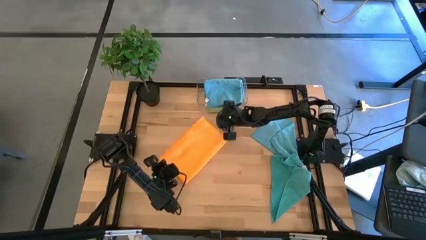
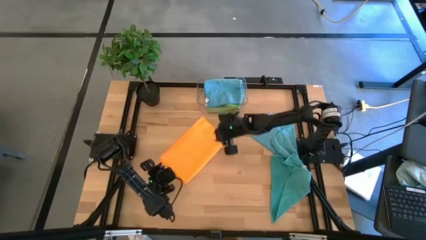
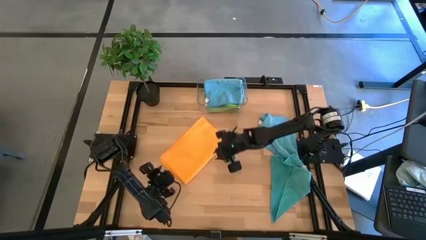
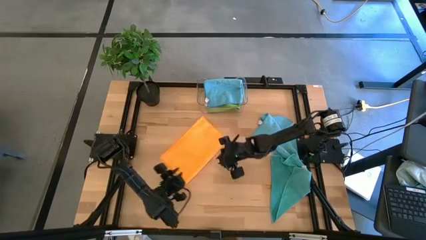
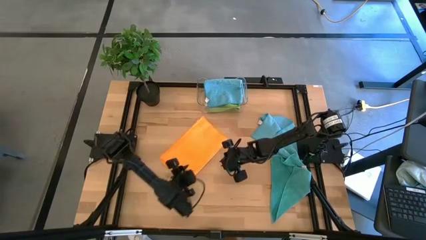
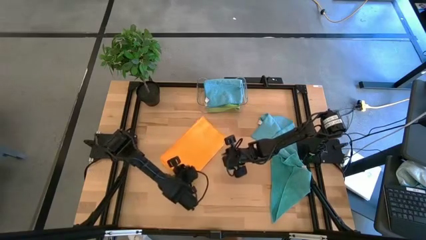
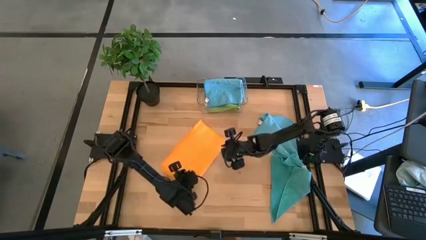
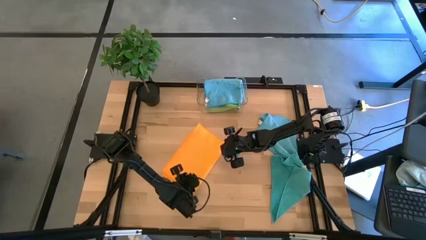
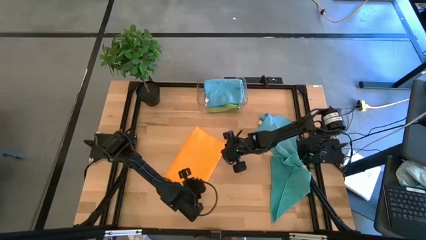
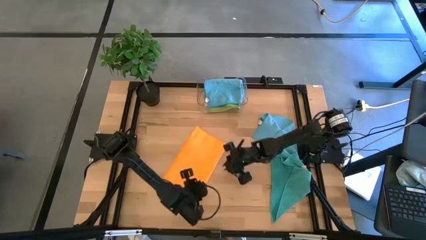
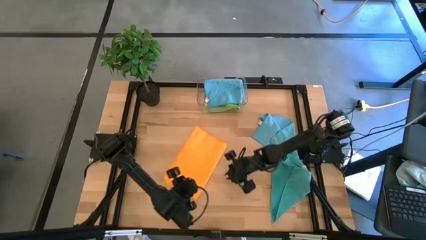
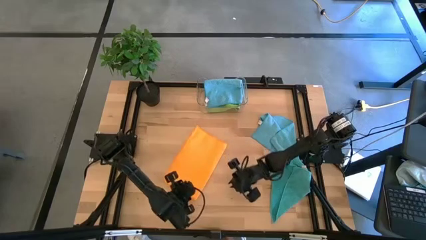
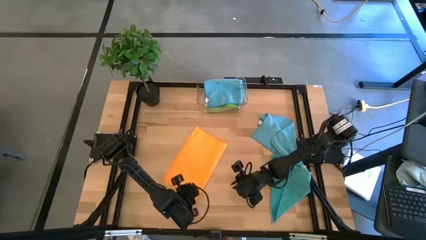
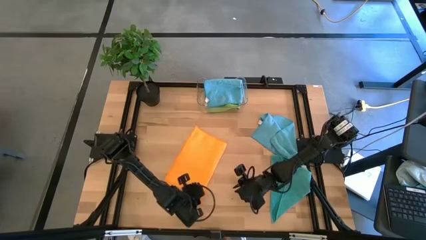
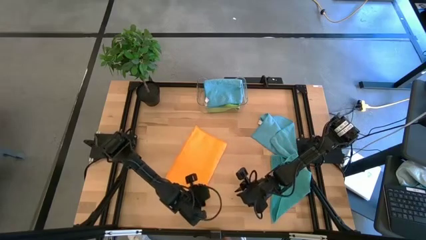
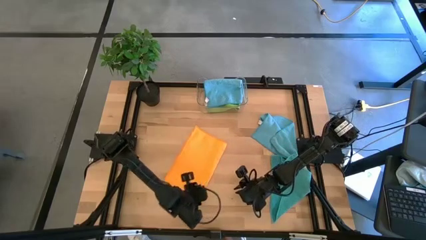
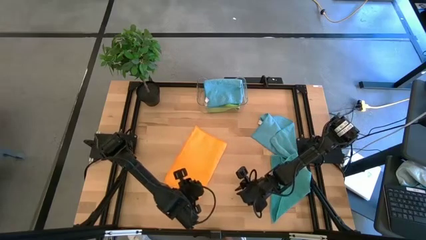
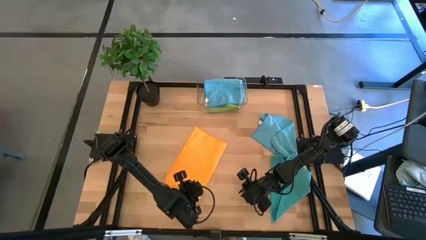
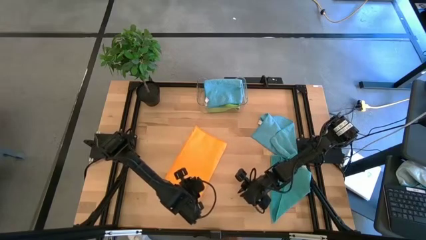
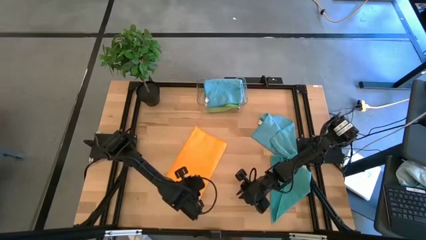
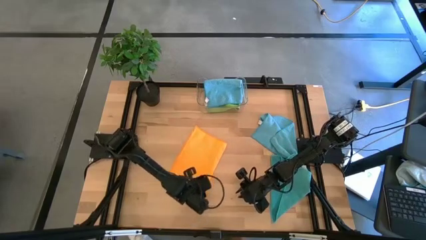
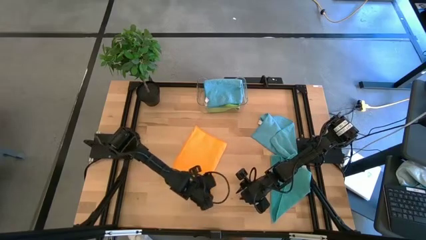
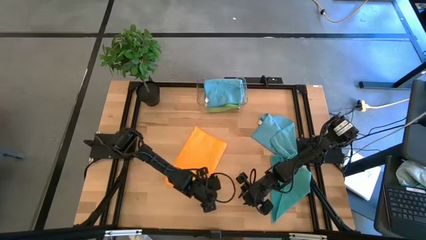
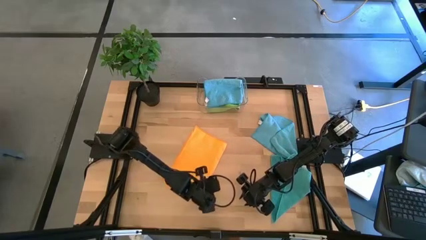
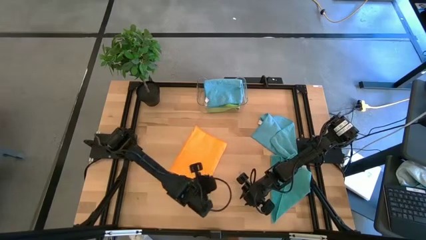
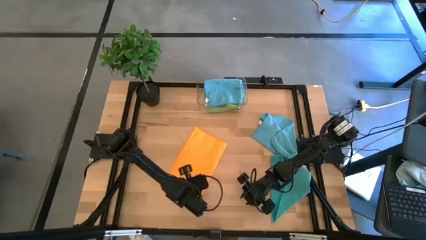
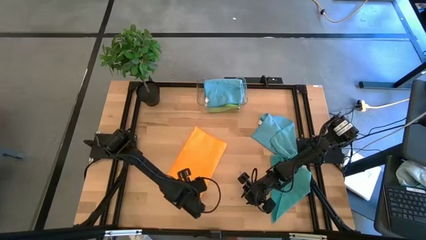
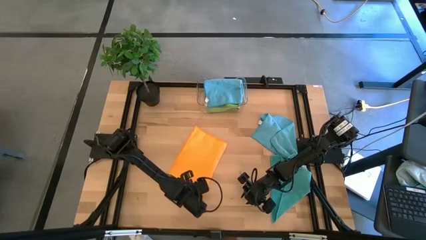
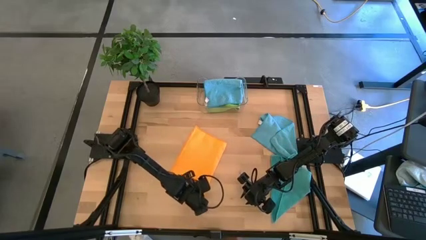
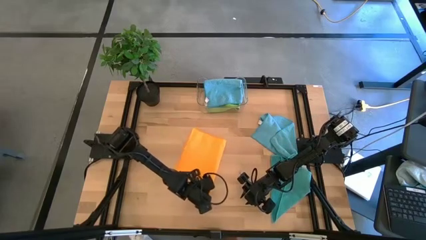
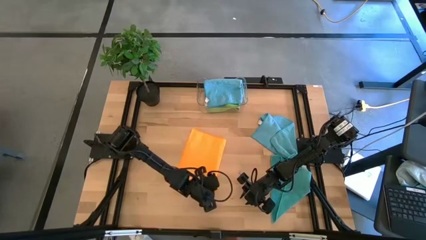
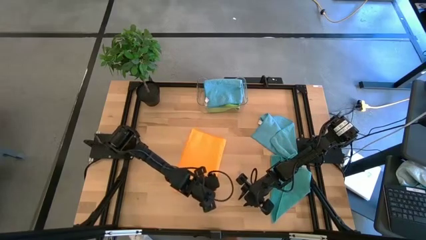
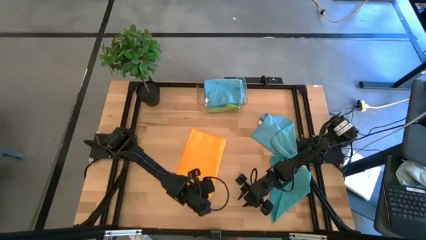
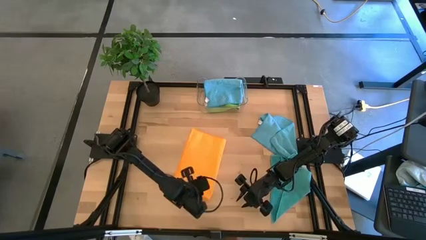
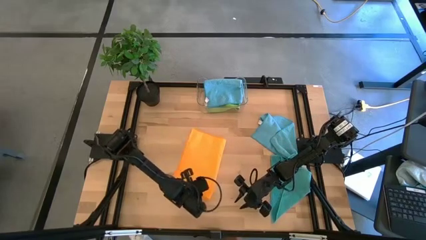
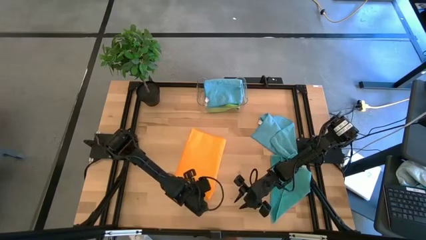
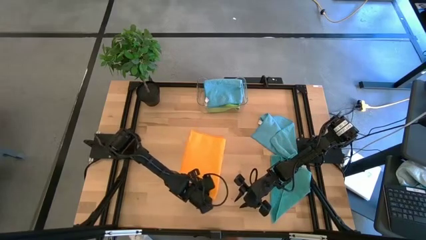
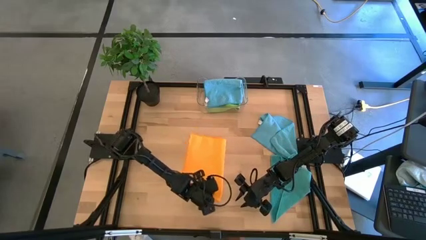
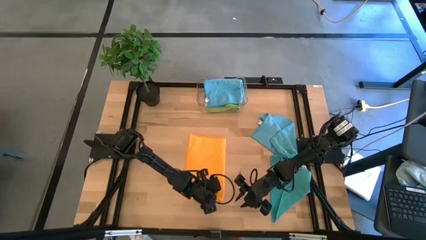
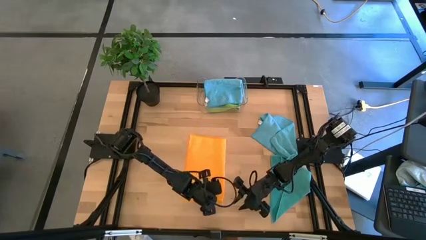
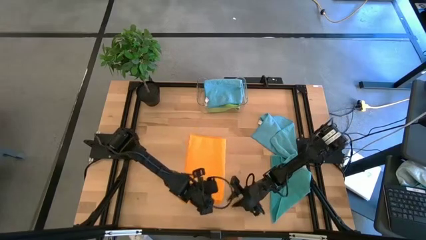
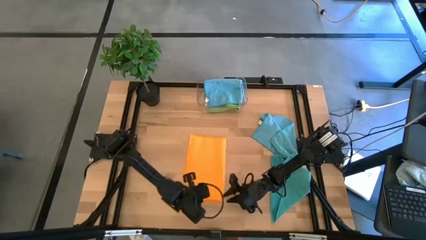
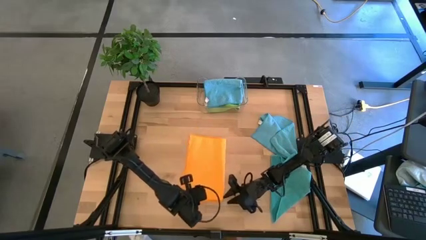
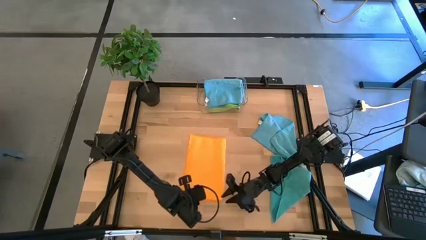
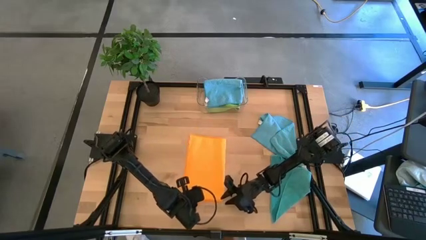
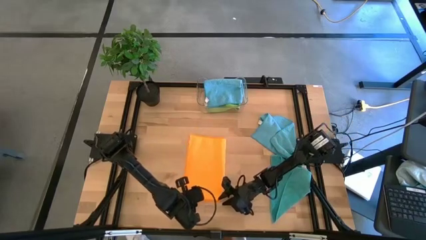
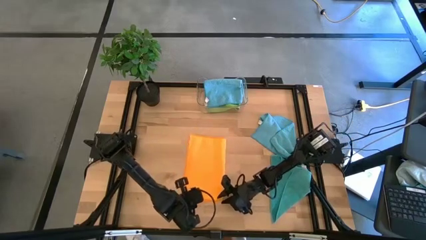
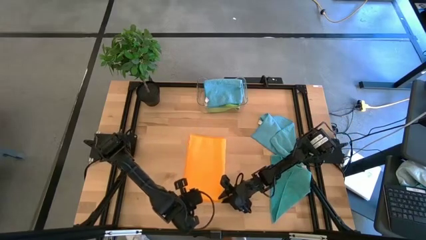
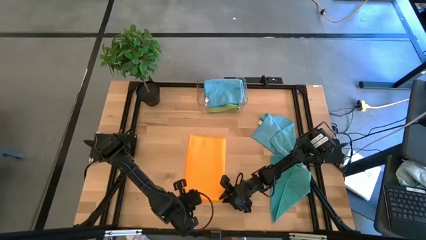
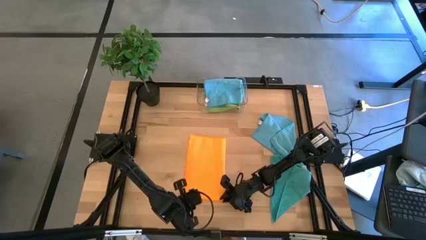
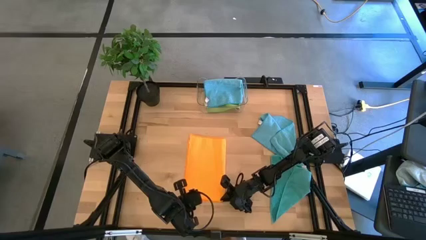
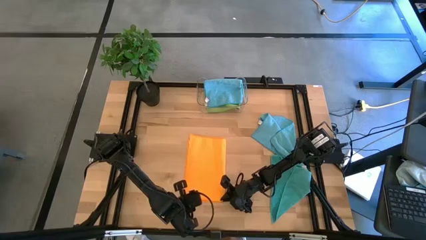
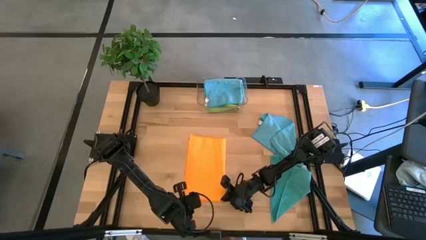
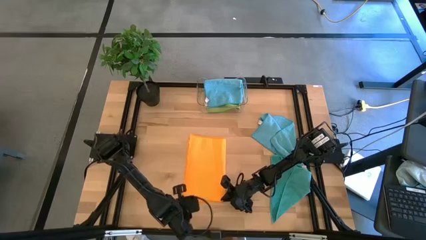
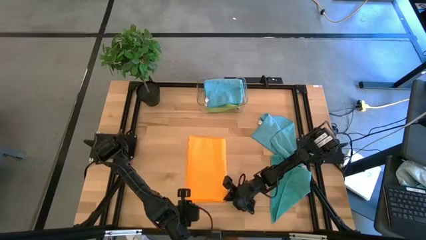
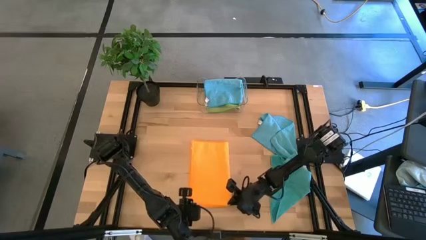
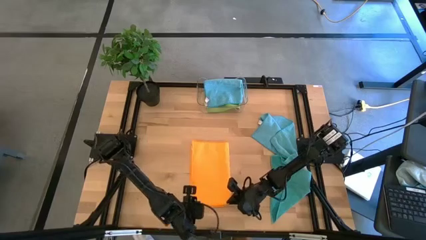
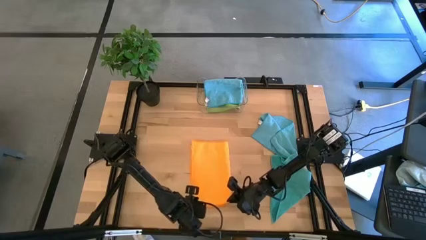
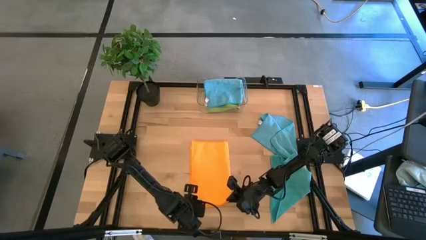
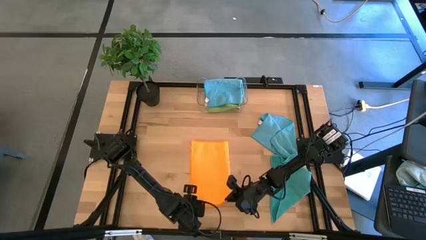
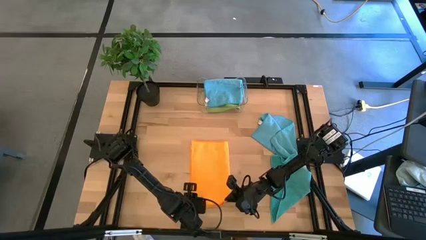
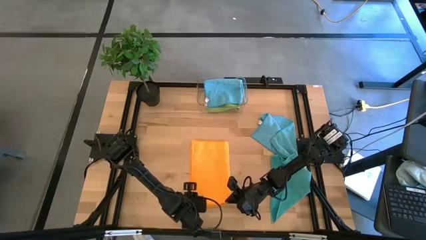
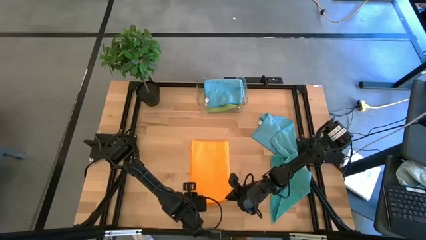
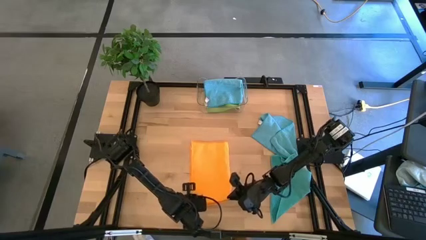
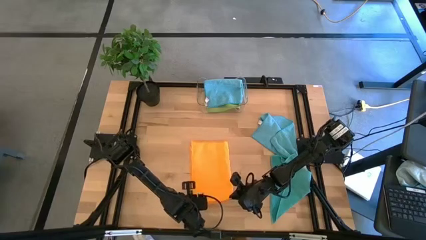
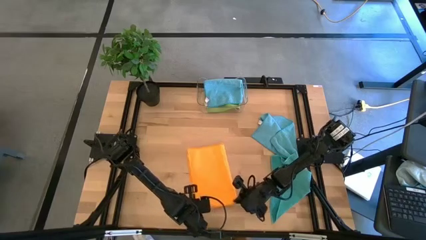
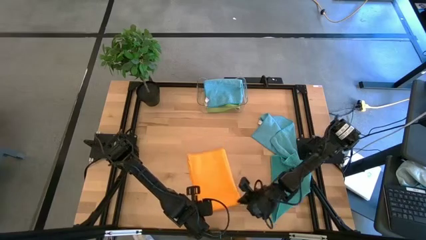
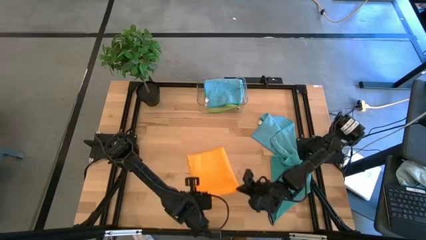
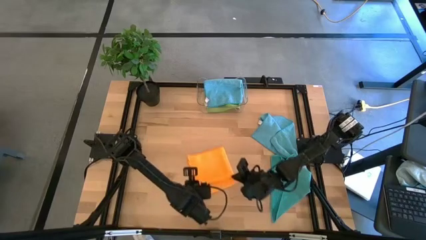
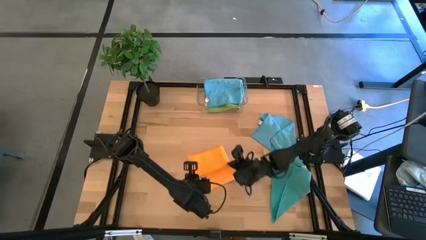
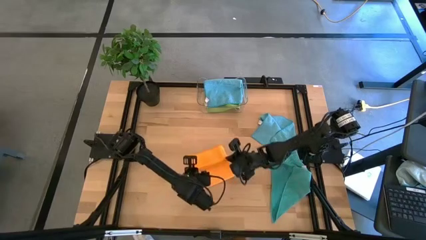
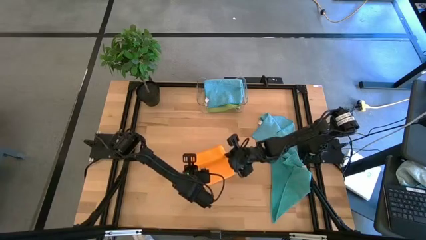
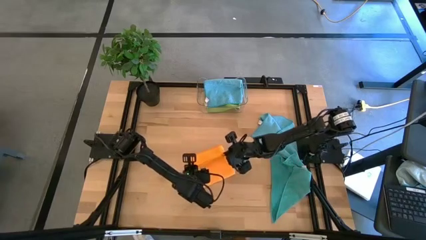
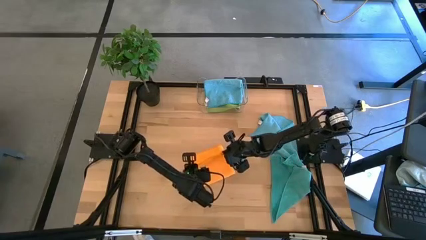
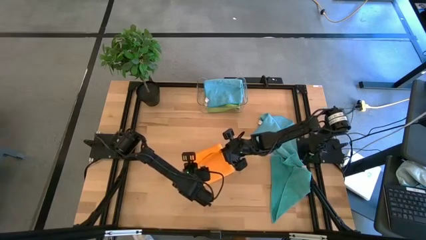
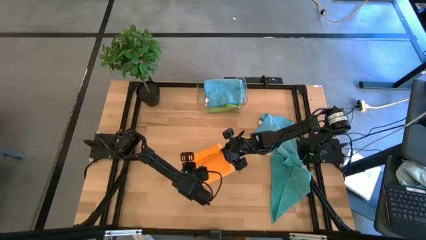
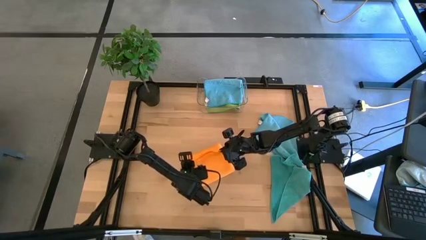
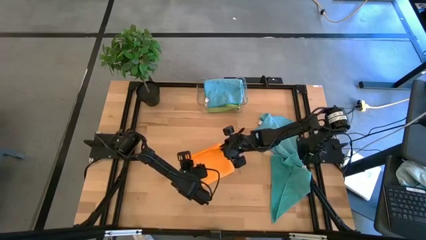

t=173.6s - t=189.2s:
Task: Fold microfiber towels
Fold the orange microfiber towel
